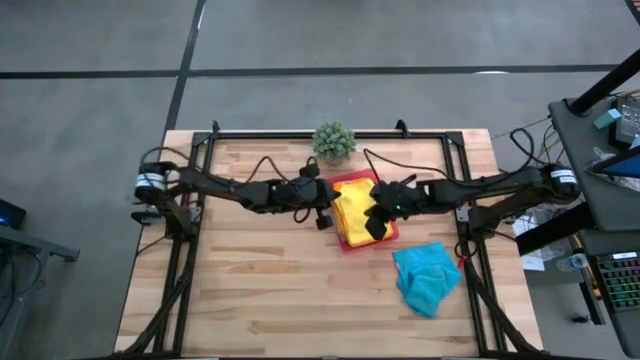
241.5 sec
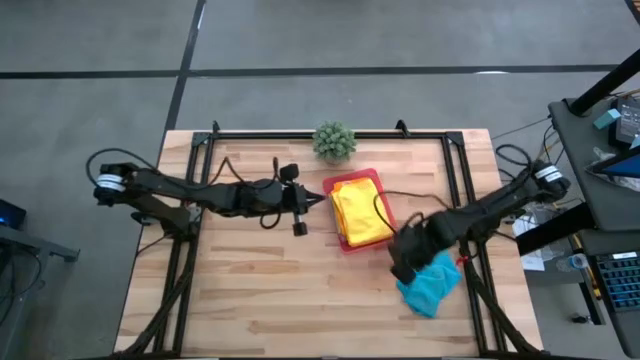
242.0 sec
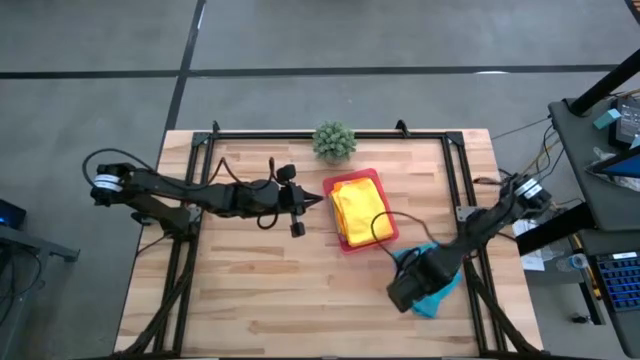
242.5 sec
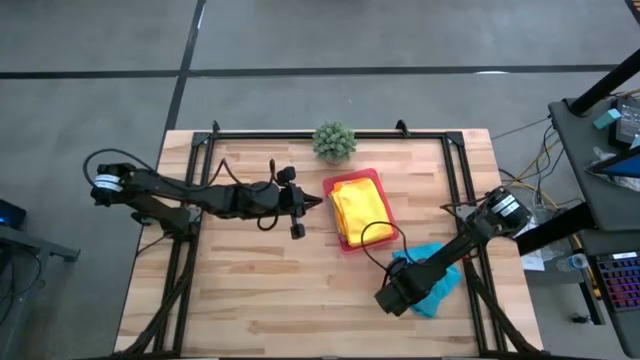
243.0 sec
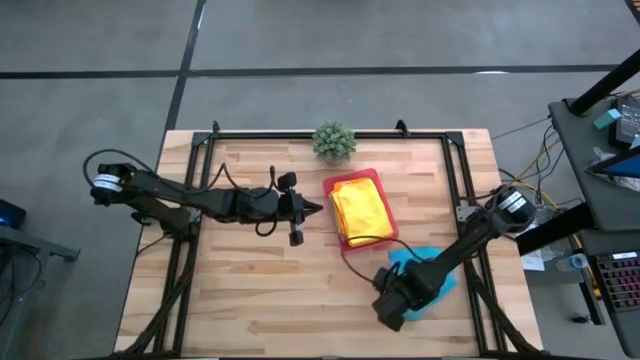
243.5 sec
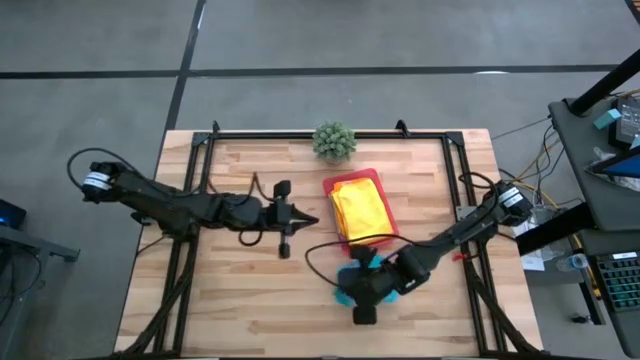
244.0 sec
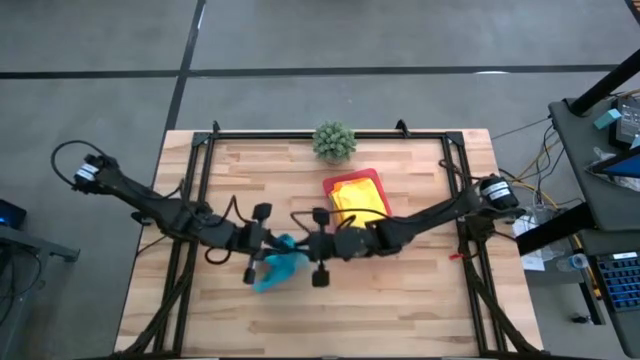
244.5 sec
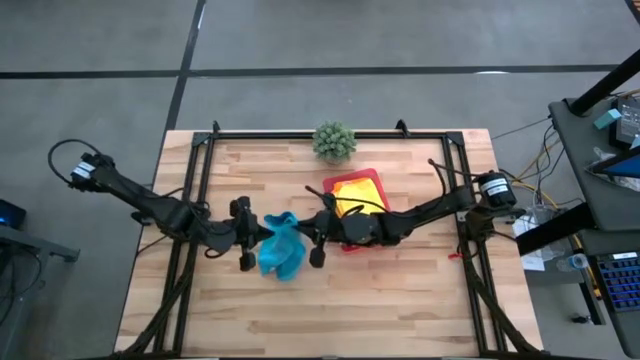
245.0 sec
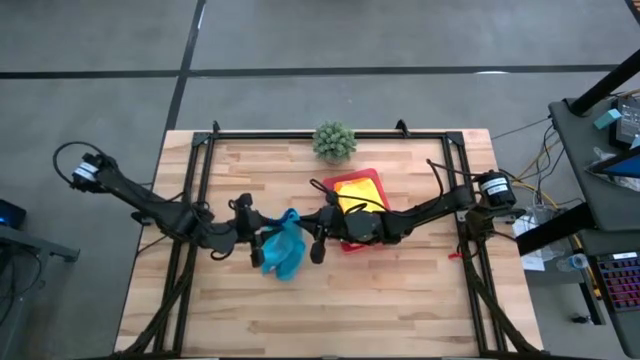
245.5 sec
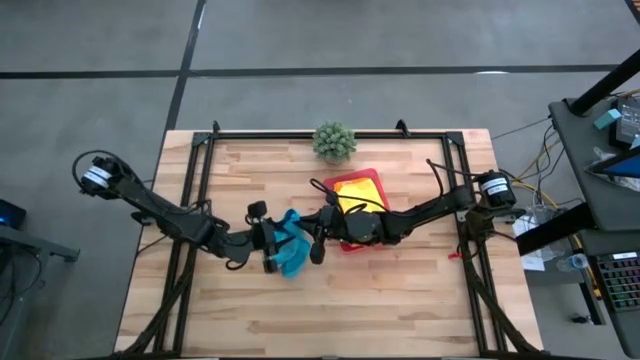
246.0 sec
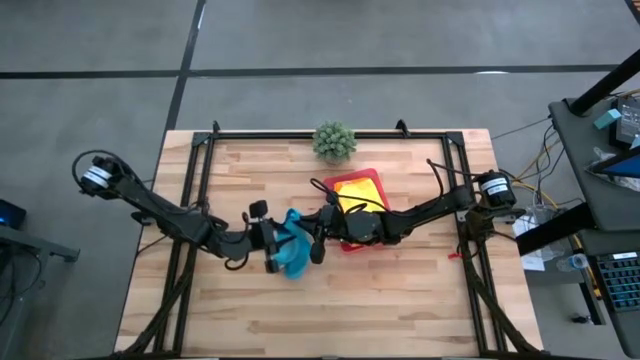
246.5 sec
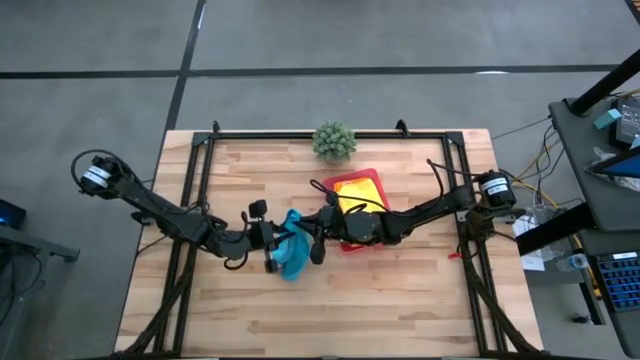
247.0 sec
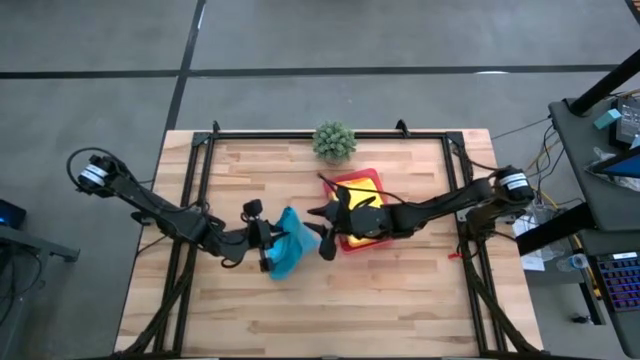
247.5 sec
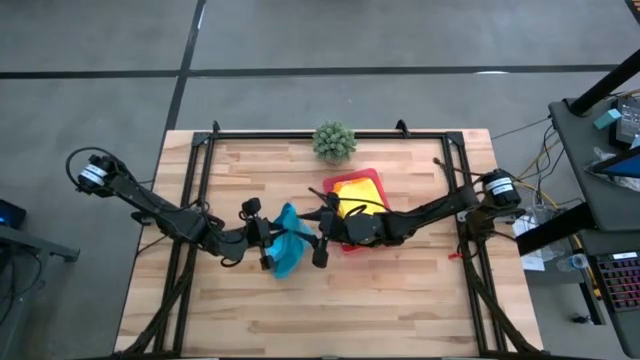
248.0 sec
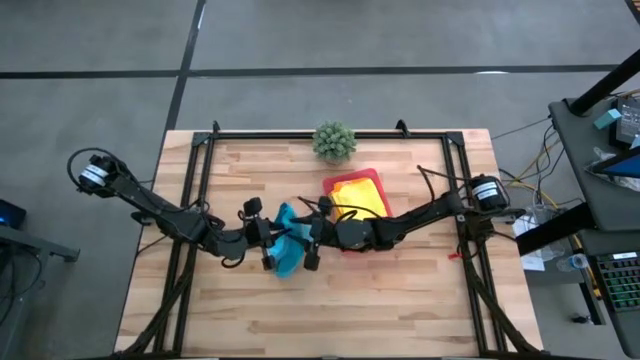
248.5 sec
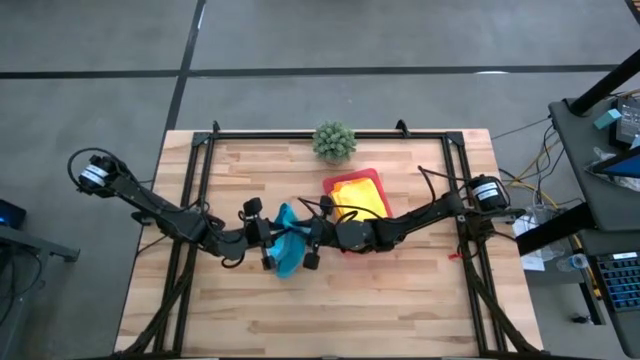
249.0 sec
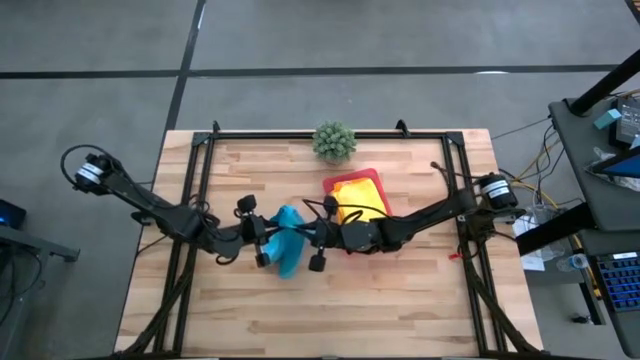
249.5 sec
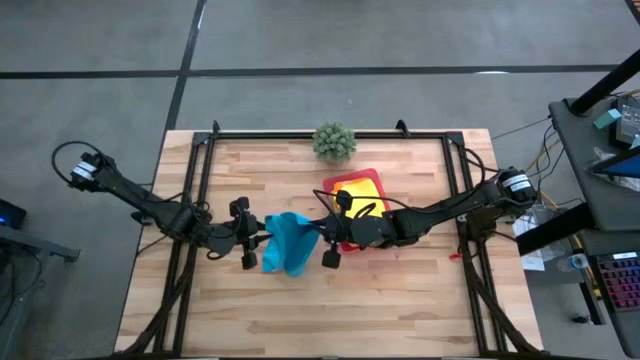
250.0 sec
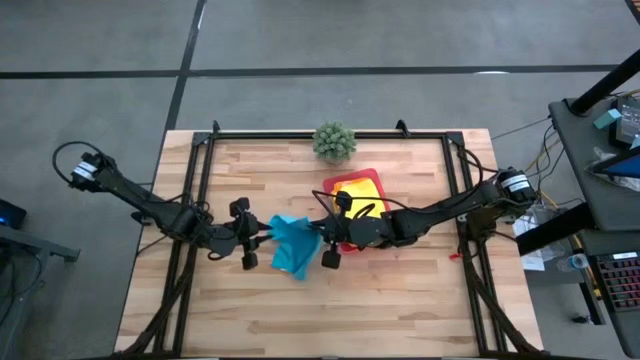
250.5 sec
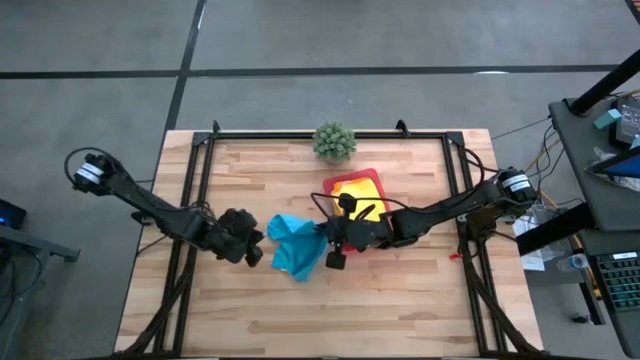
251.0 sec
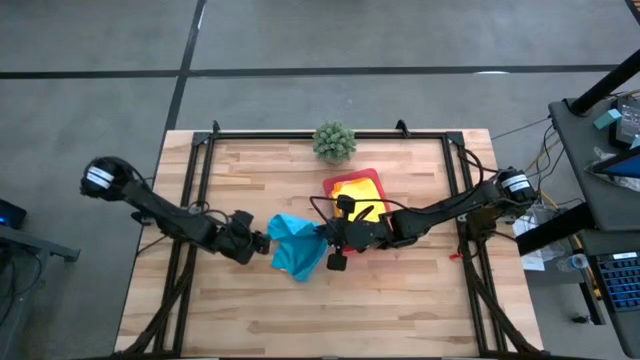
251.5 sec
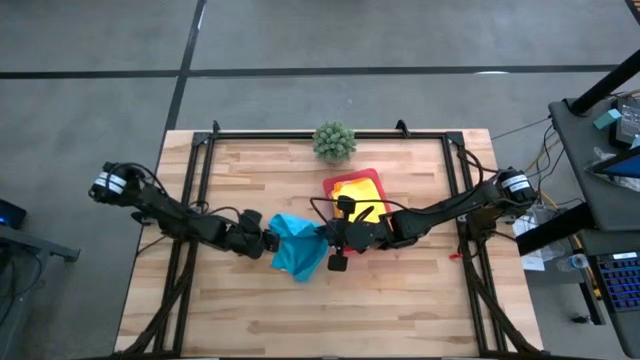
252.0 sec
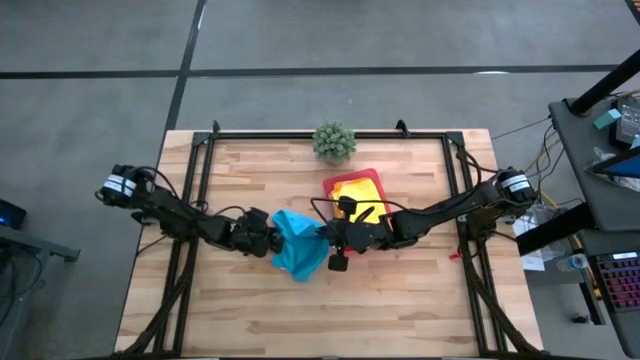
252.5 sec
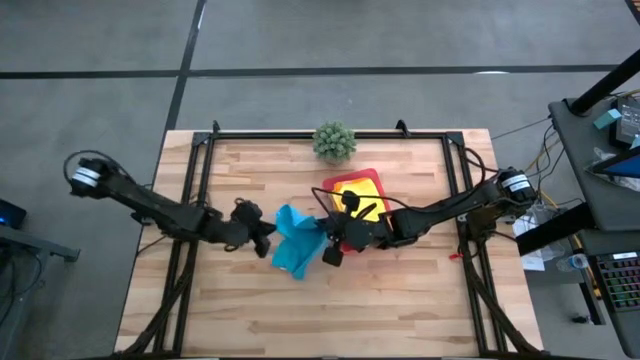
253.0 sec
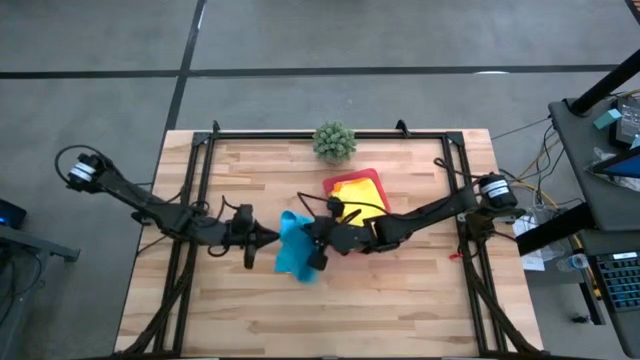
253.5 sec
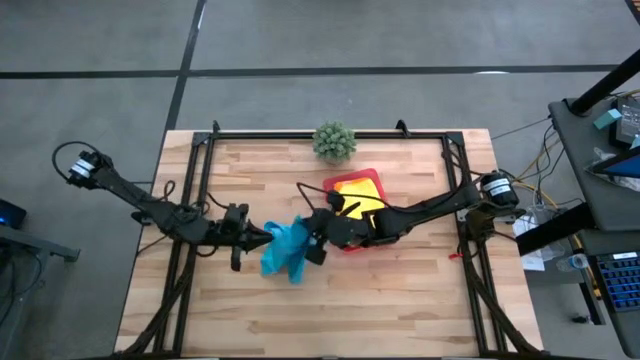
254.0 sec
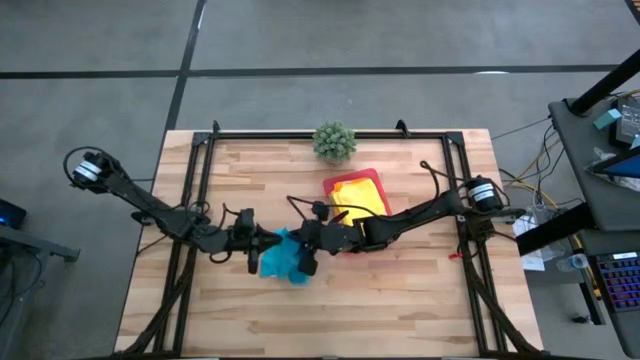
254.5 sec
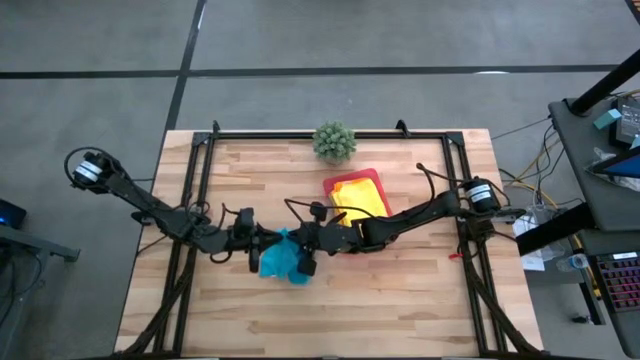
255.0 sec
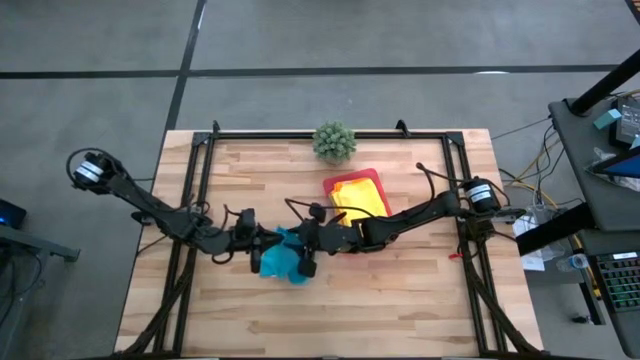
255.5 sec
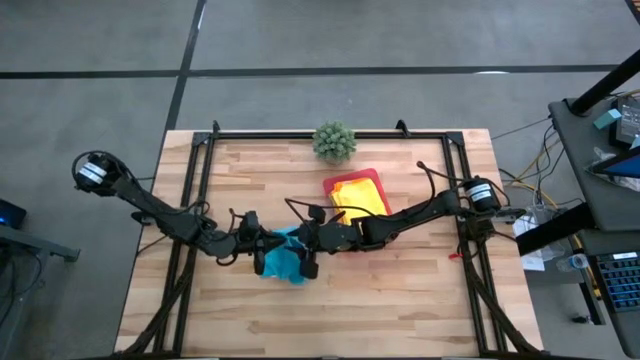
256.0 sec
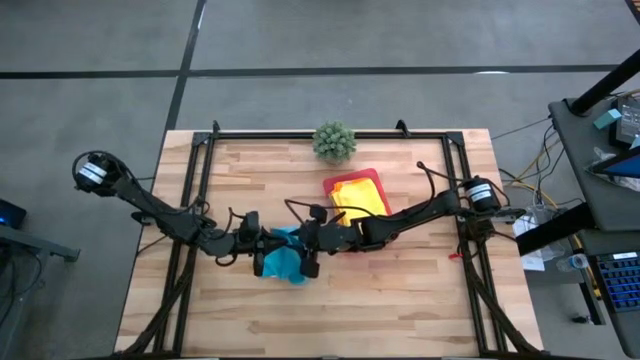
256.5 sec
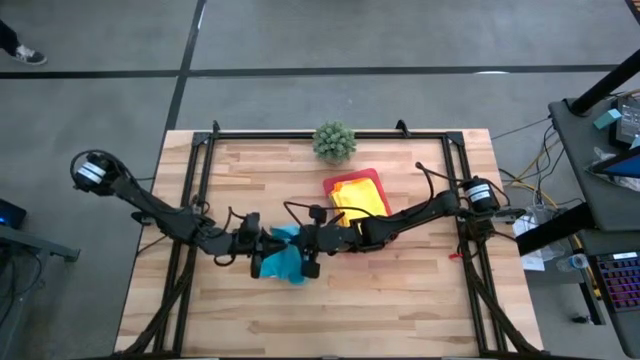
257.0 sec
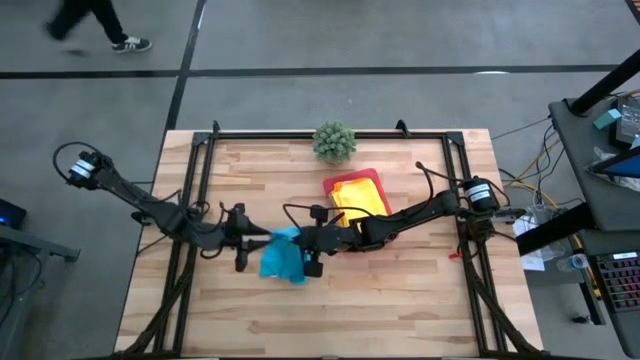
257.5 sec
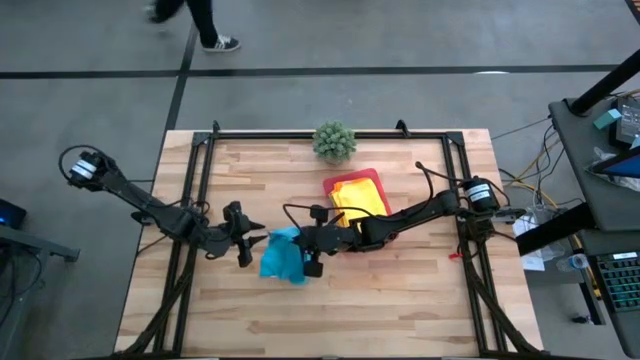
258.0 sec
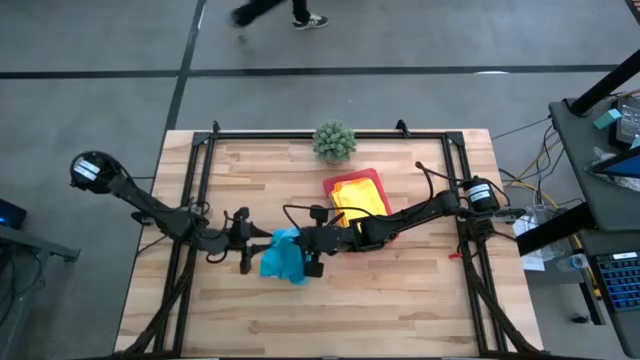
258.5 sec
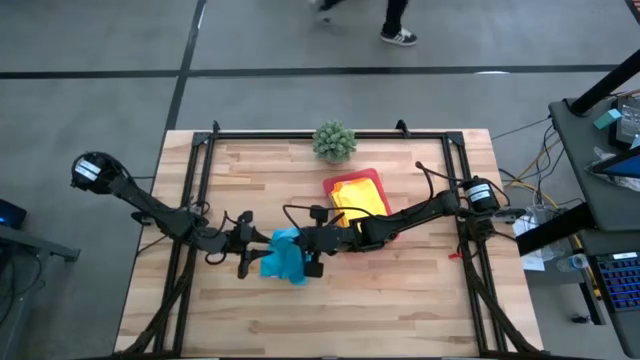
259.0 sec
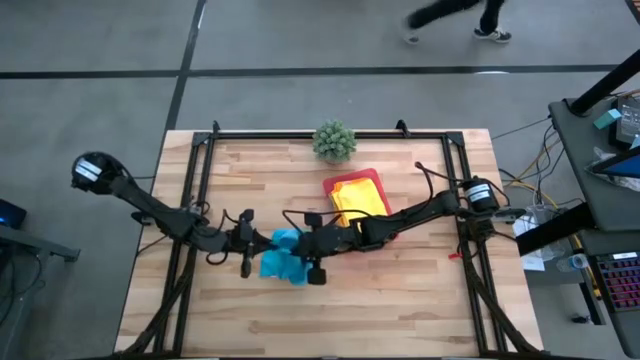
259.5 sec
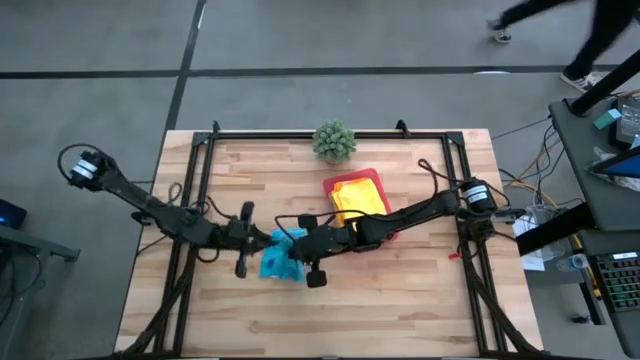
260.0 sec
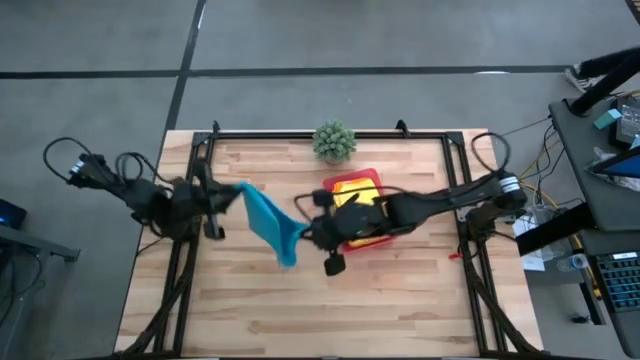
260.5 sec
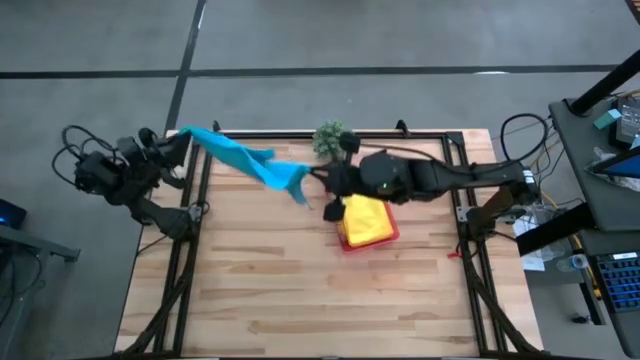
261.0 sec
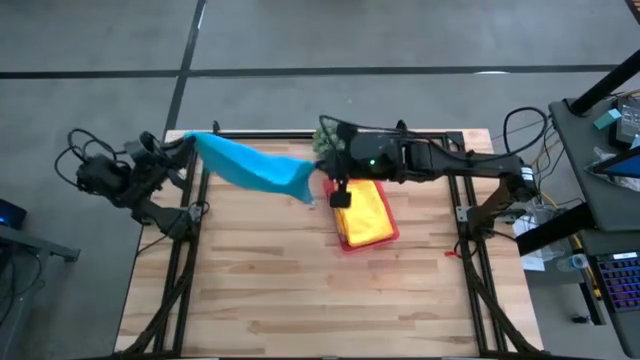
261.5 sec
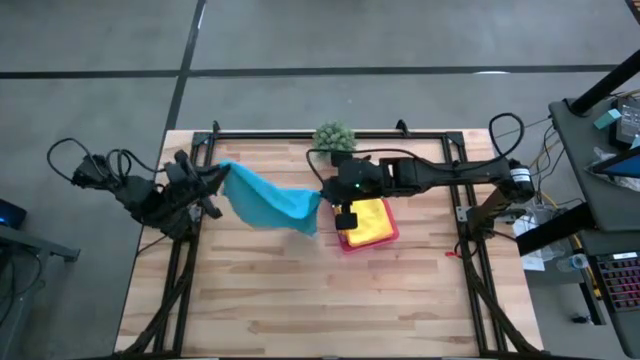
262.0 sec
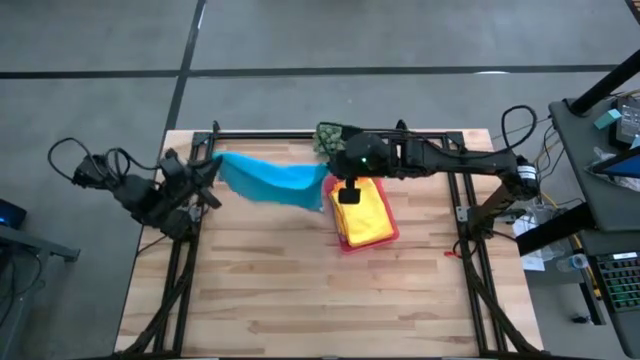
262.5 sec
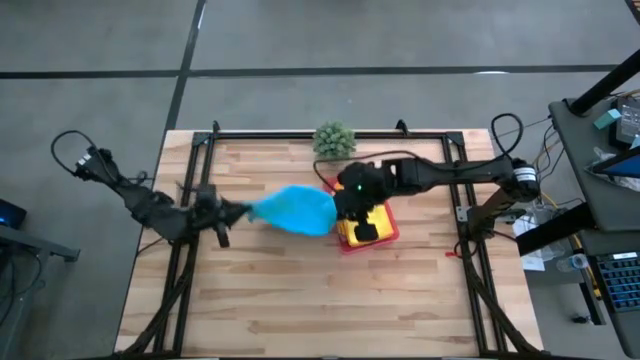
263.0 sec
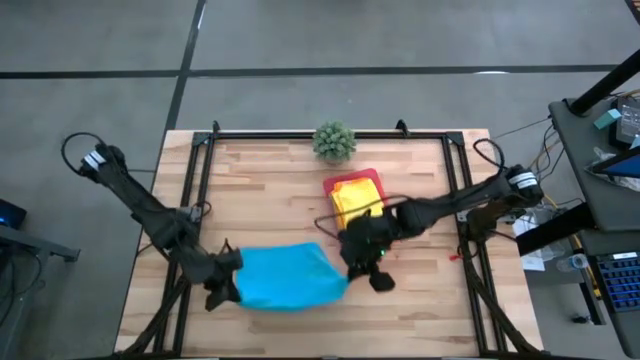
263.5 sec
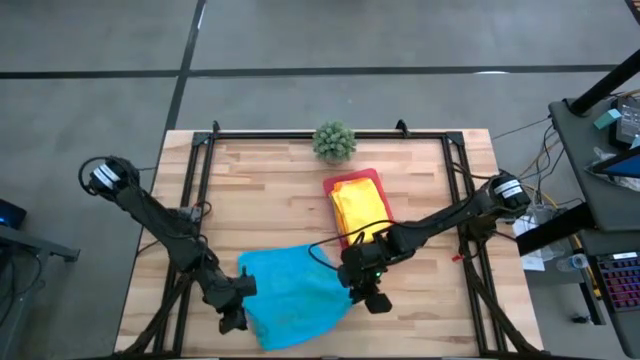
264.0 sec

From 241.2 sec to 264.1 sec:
Task: Fold microfiber towels
Fold the blue towel
